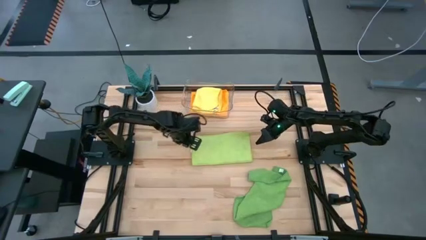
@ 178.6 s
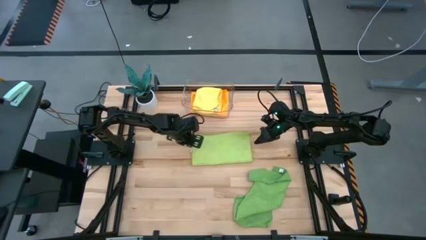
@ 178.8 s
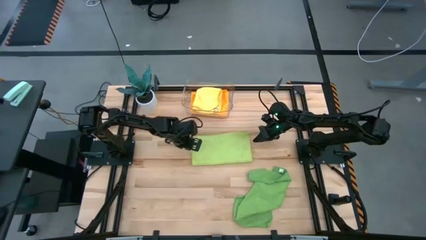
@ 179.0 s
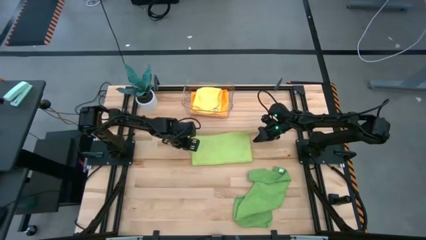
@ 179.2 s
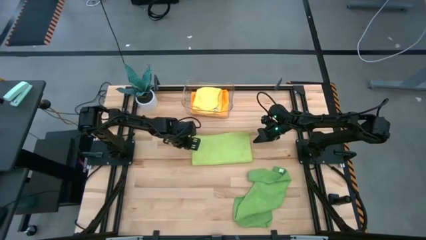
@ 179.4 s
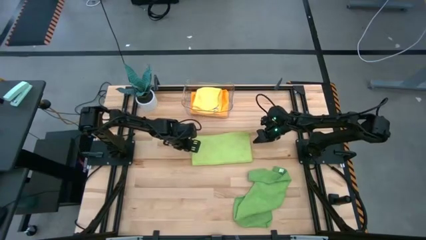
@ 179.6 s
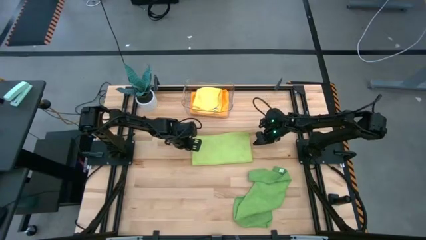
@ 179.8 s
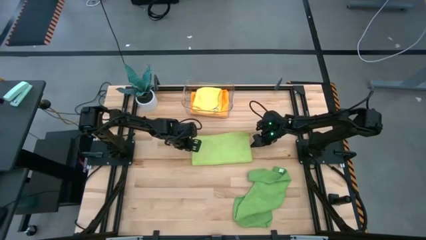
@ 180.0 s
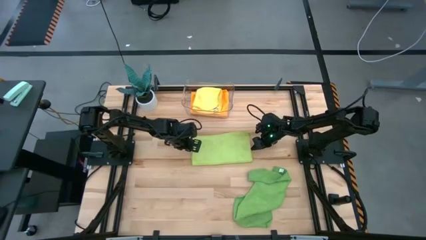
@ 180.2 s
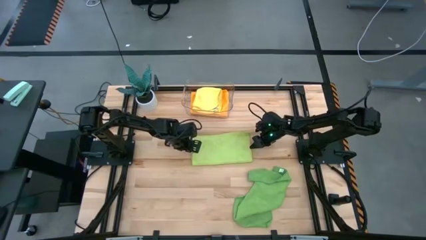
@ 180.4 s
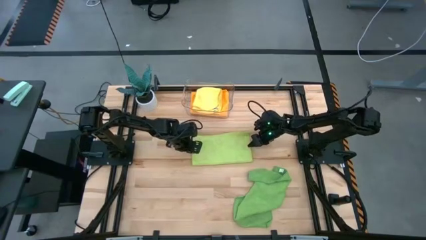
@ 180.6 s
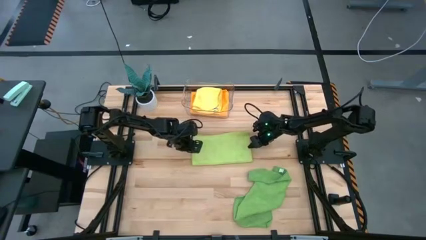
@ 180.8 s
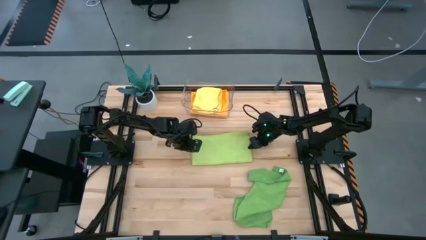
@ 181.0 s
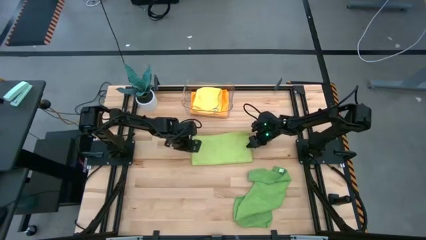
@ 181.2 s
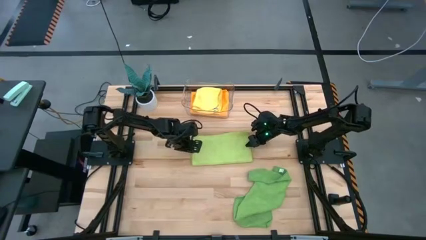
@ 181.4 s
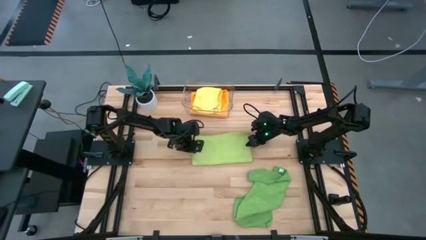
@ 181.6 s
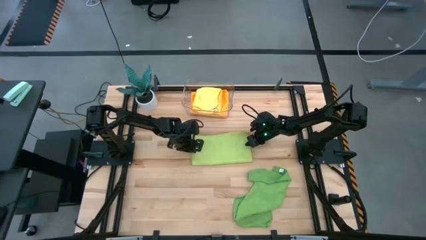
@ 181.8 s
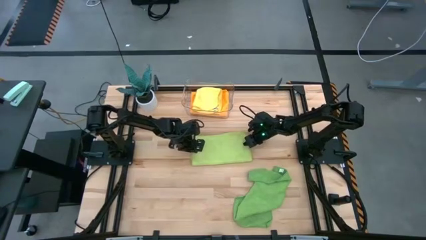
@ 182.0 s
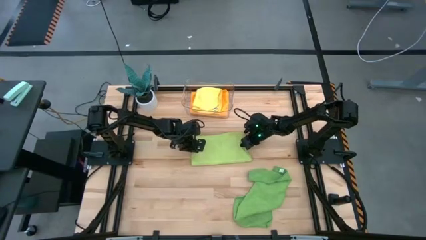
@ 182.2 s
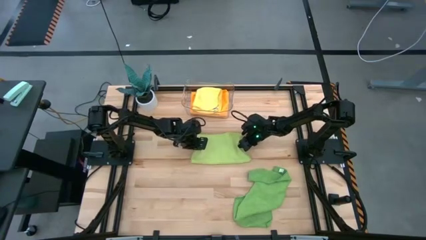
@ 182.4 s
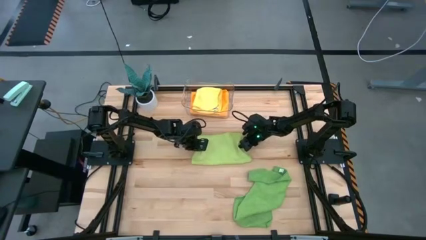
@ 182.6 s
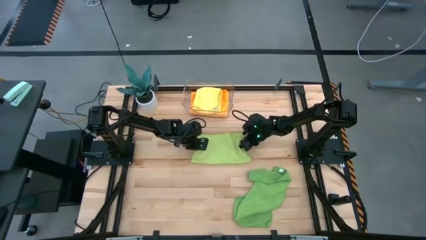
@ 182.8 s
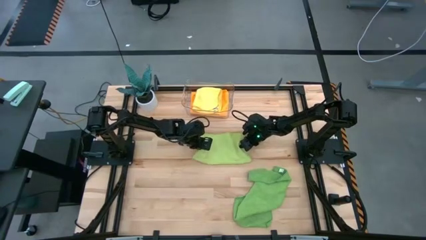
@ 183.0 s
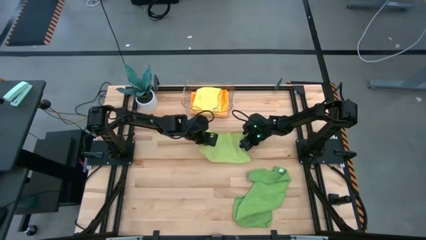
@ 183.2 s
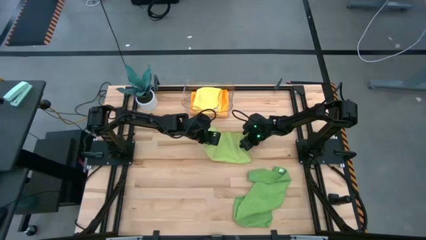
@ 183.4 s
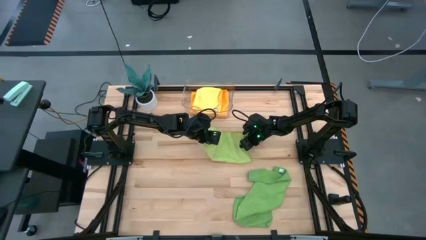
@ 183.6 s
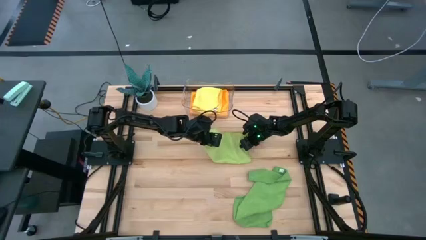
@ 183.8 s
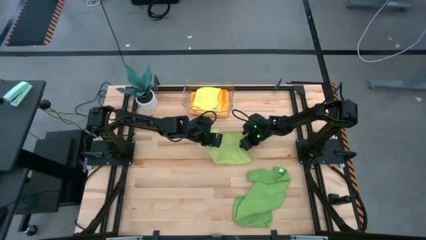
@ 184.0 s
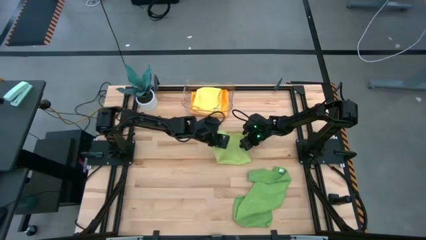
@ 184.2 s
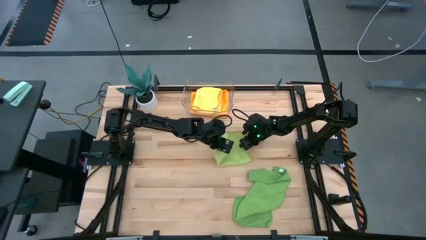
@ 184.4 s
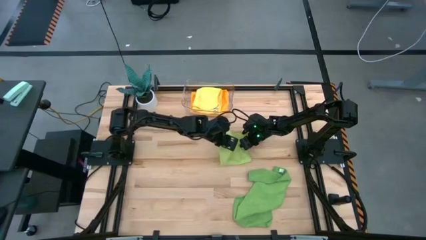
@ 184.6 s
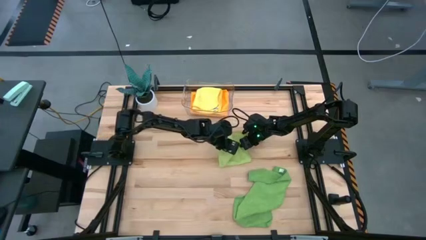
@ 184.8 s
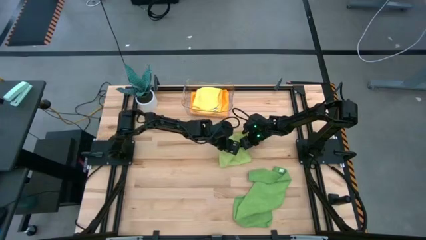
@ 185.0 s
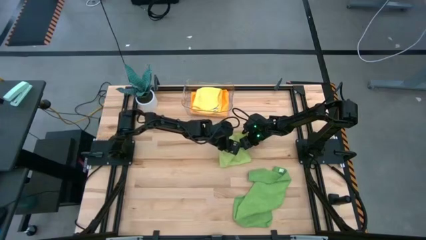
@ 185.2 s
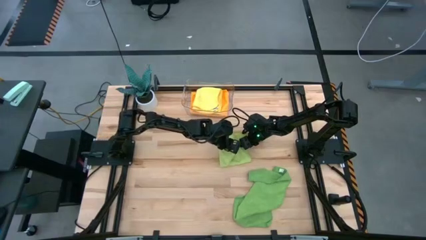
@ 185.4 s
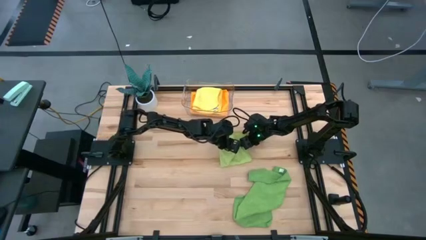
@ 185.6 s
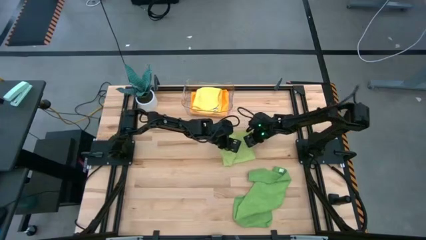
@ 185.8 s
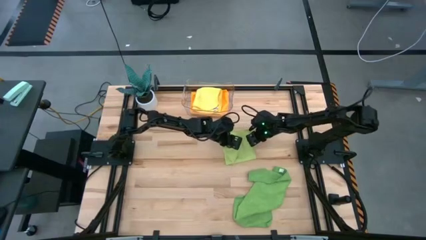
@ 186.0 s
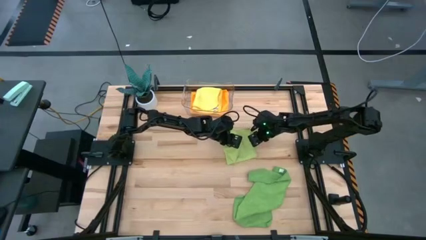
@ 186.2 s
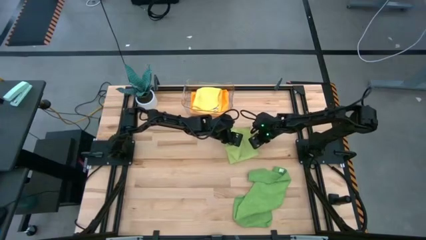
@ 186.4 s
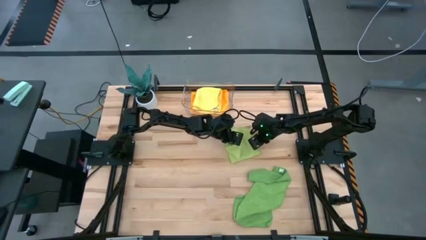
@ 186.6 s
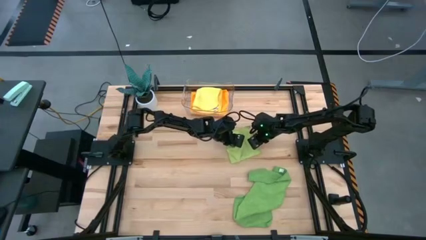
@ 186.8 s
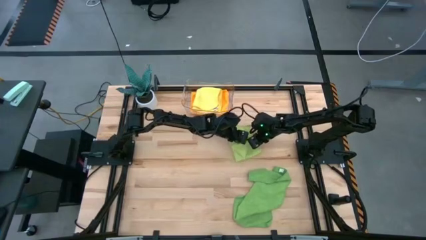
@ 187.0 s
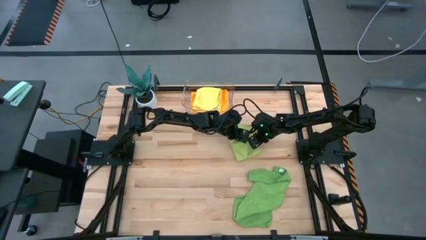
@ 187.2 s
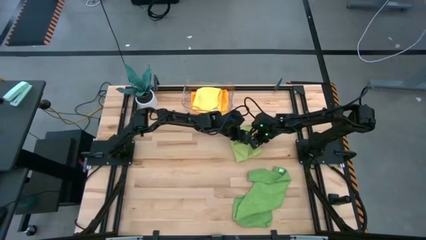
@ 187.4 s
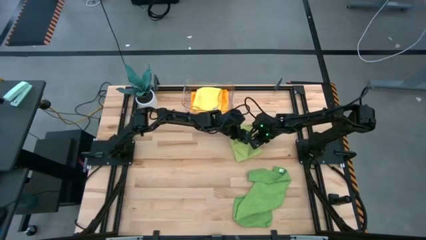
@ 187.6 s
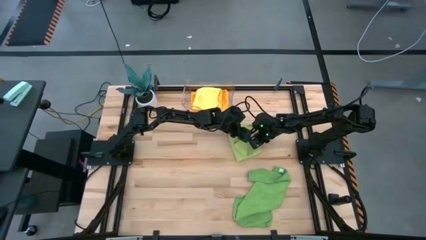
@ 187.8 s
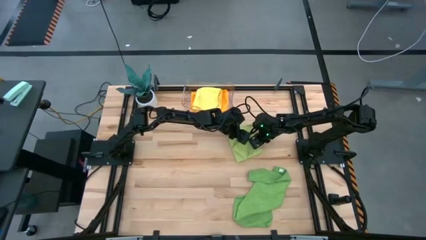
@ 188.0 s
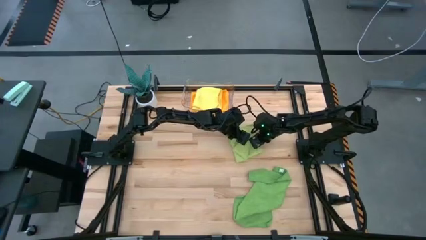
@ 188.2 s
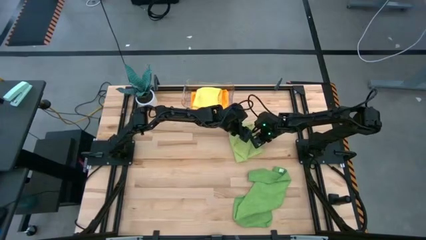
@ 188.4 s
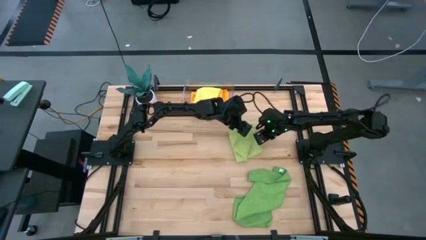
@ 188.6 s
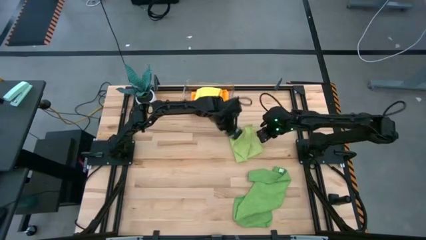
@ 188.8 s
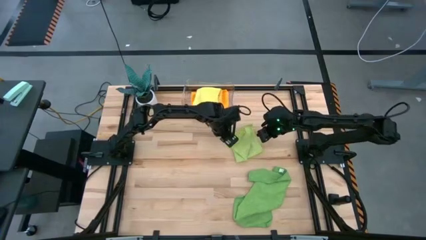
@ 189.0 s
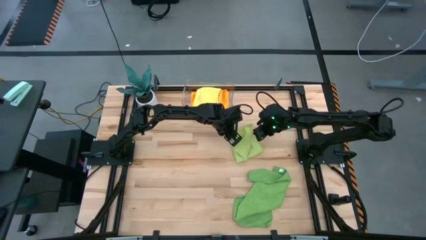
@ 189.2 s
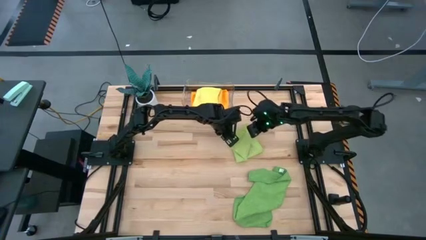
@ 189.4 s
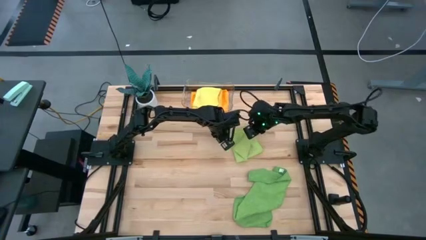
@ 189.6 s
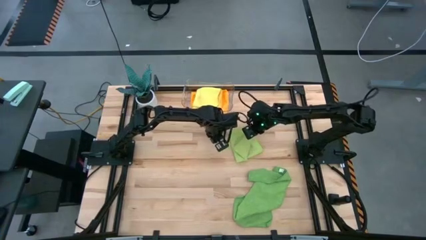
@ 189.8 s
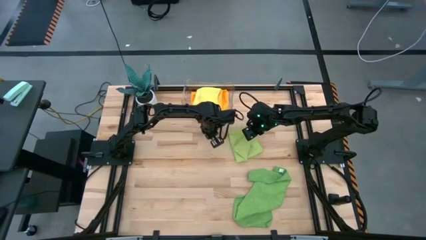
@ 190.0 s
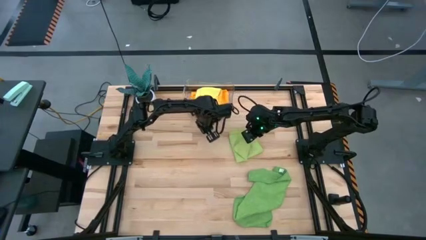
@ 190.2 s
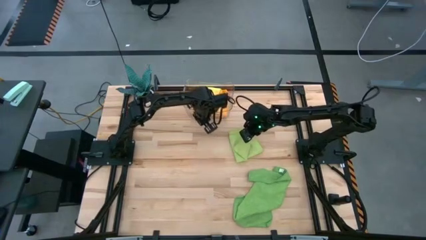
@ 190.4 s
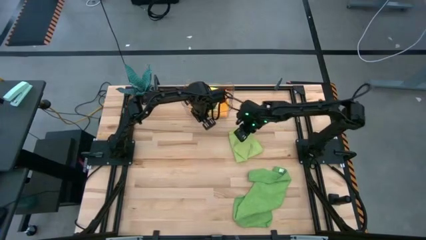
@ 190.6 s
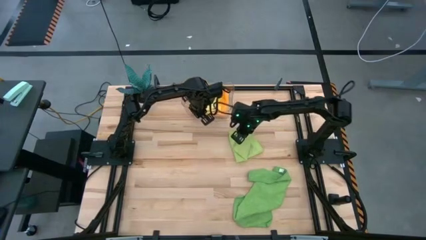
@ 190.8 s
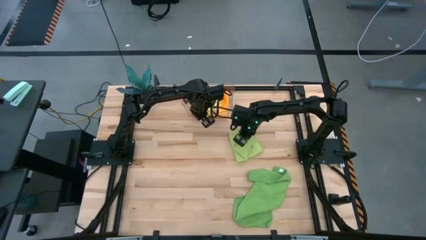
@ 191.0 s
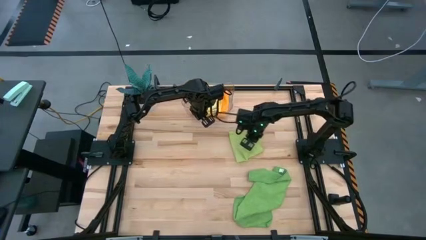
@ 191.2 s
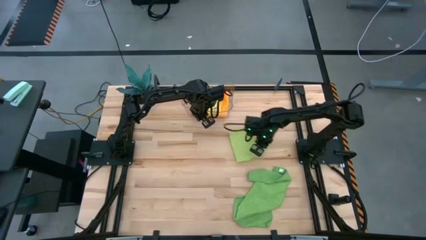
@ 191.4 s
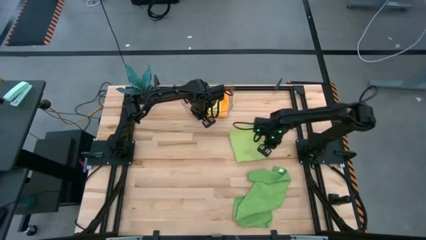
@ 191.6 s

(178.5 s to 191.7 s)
Task: Fold microfiber towels
Fold the light green towel
